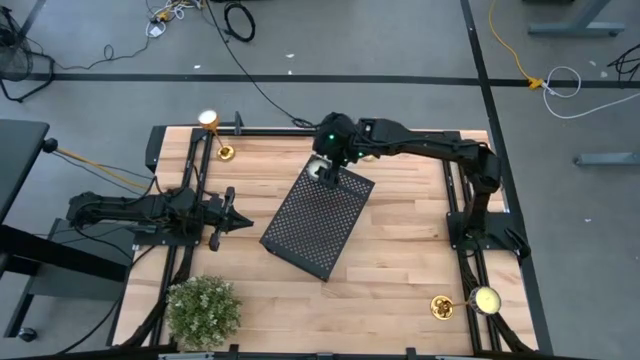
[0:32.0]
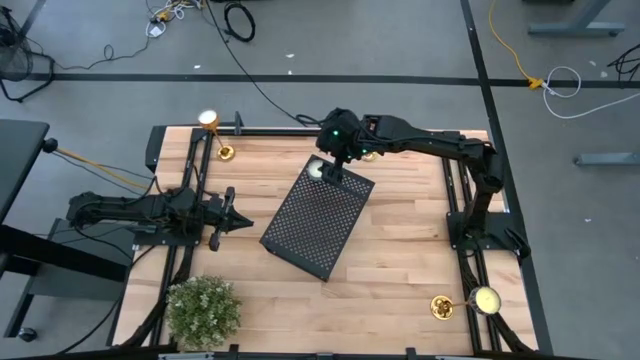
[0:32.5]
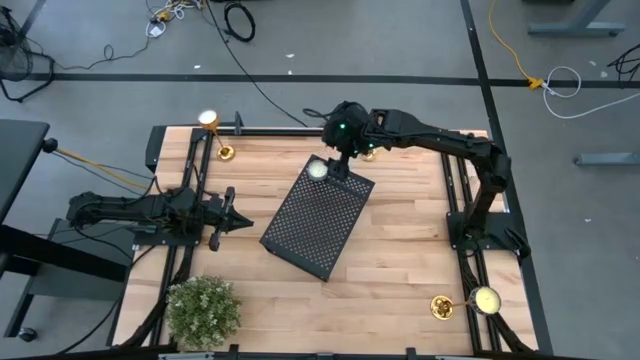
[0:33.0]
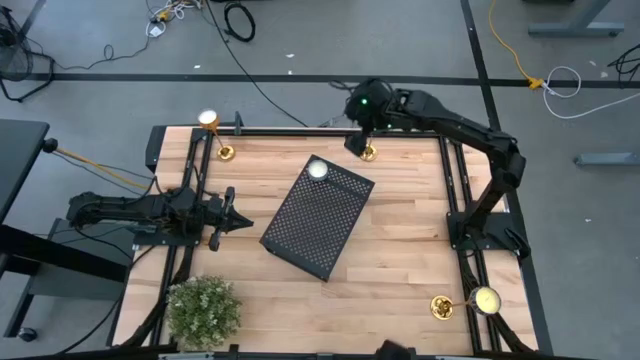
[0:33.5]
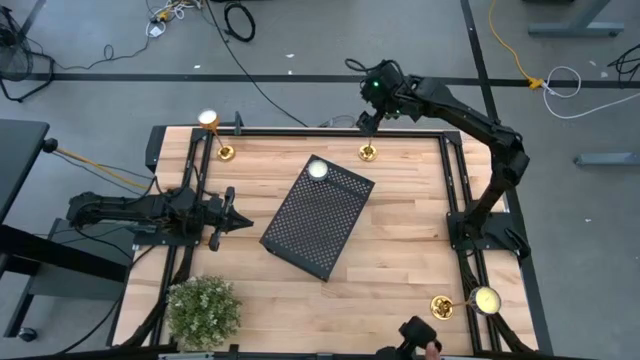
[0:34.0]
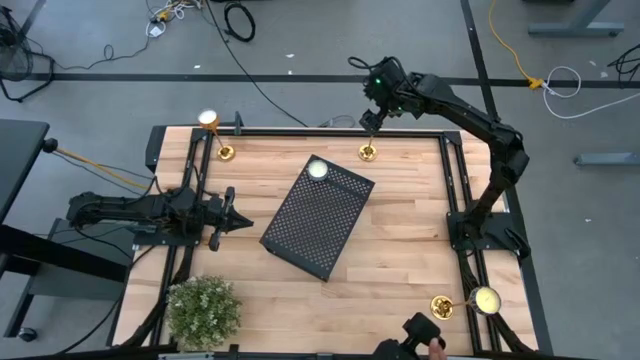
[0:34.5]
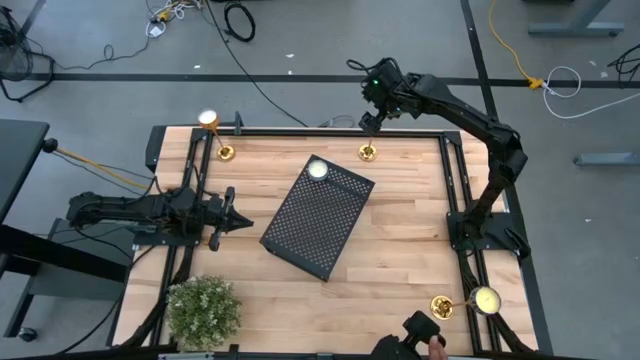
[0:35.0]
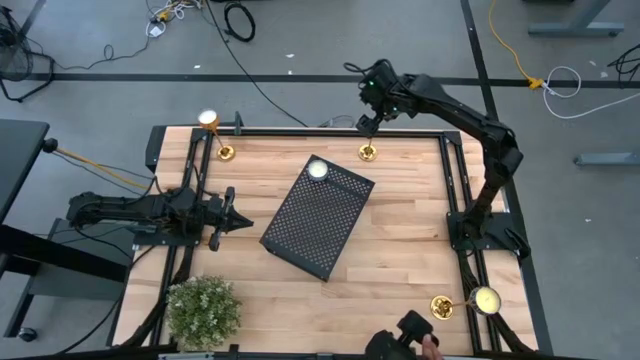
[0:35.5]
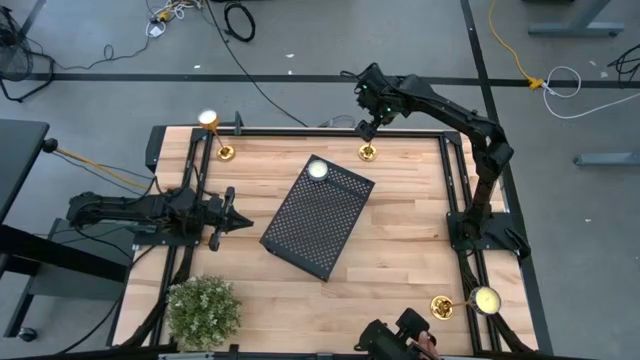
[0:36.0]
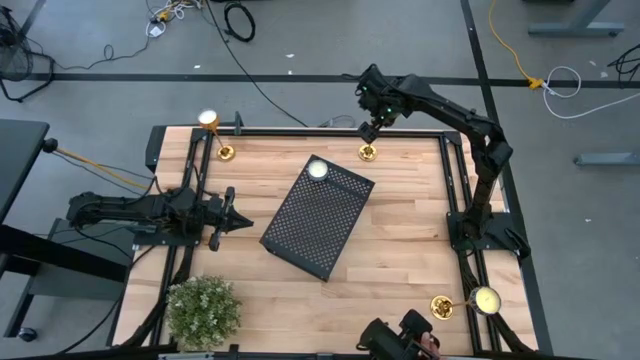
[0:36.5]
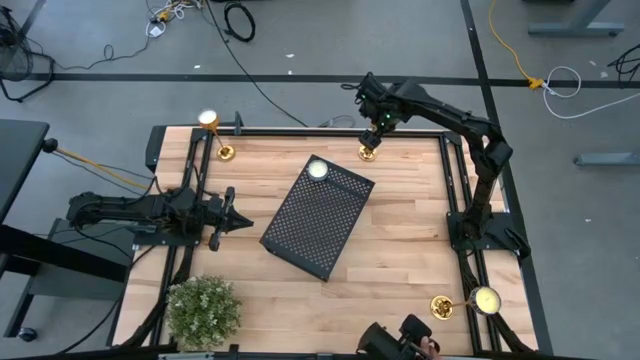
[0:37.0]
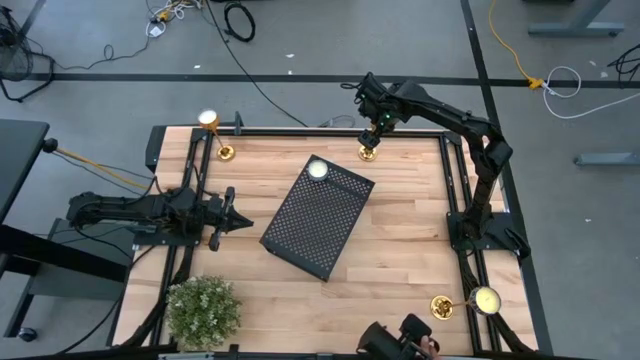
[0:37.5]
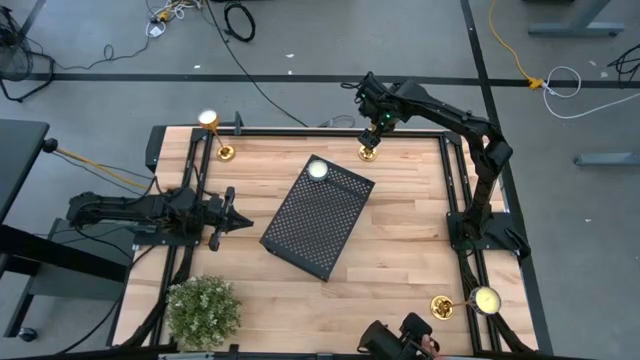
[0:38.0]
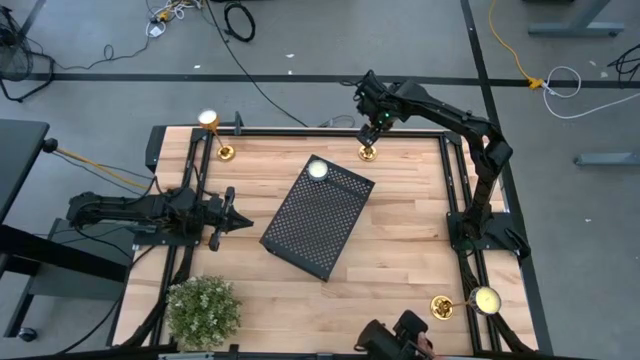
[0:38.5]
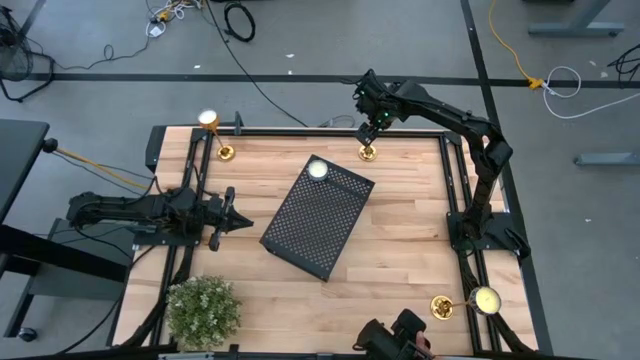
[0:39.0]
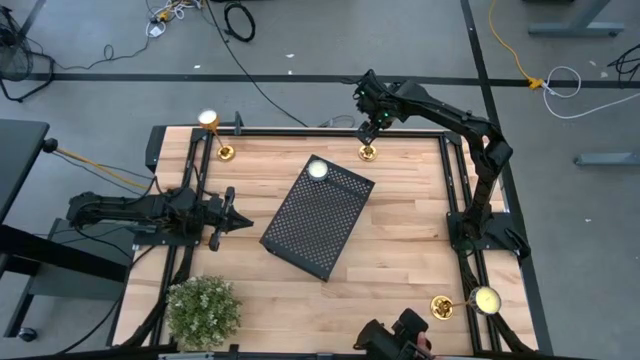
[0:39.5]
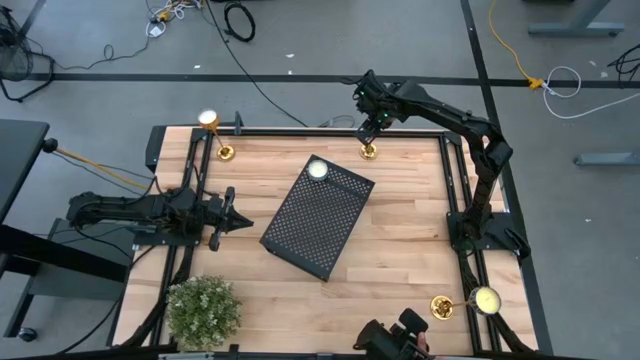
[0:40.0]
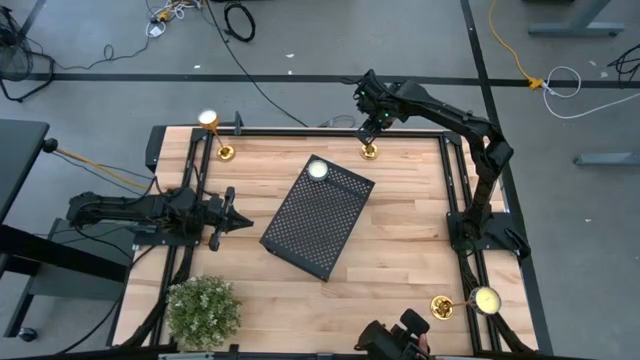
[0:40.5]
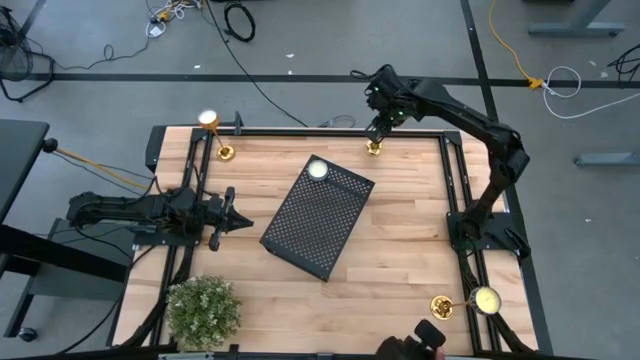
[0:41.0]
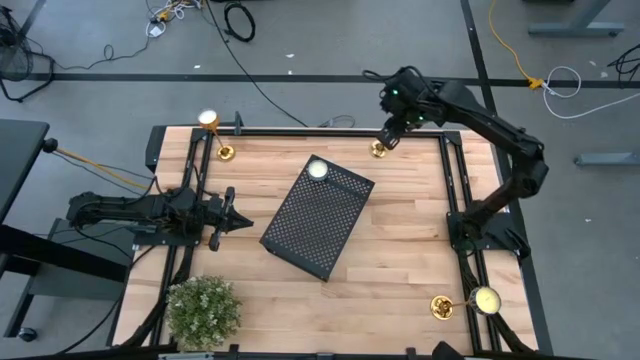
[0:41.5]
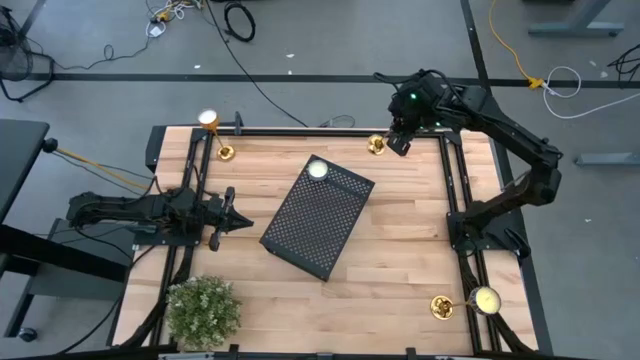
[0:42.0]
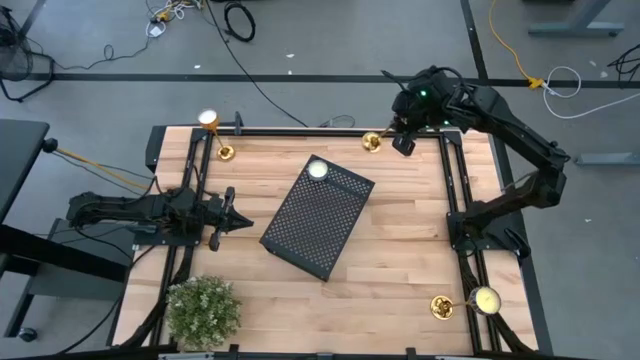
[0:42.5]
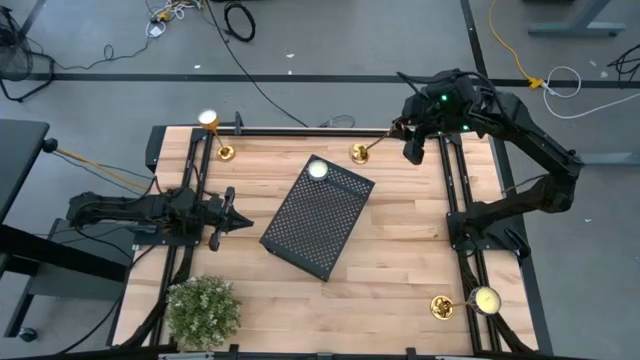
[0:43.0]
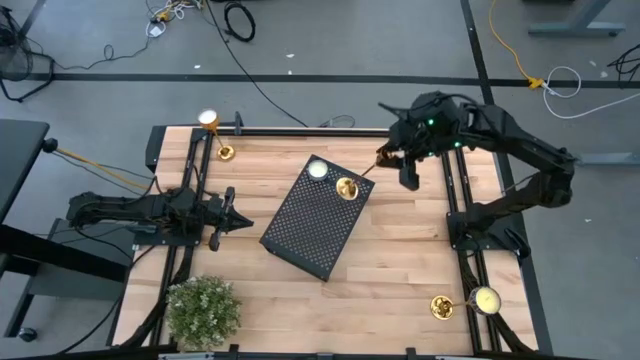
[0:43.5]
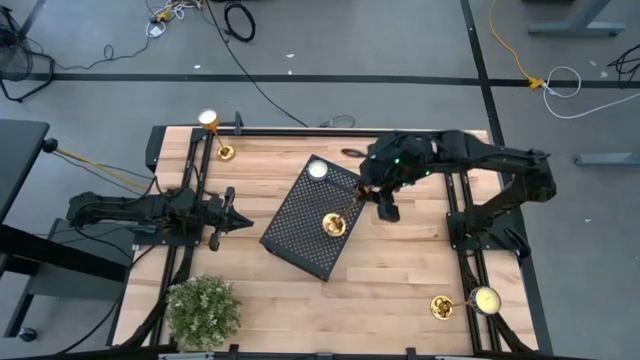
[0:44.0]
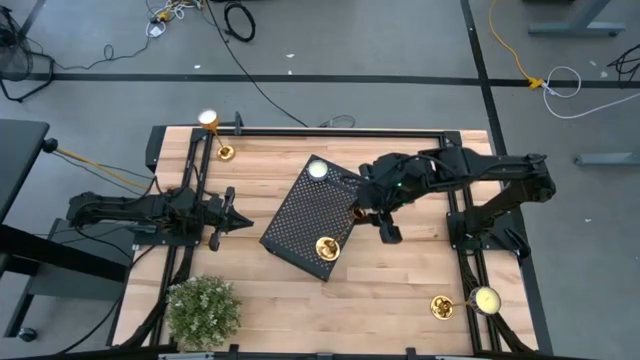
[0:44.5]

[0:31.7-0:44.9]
Task: Stock candles on shelf
Put the top right gold candle holder on the shelf

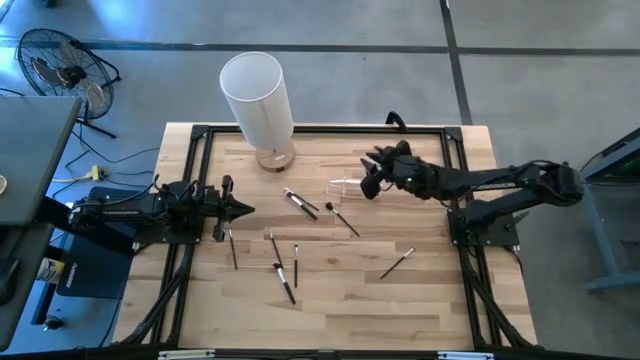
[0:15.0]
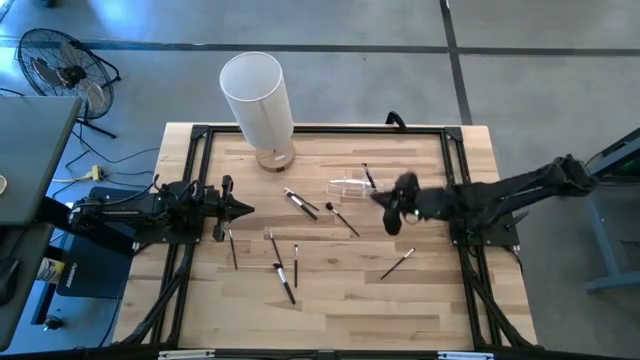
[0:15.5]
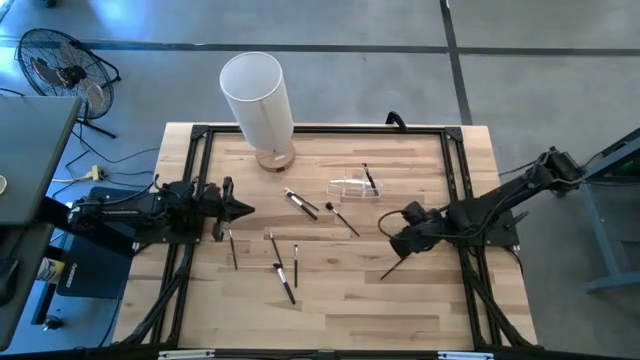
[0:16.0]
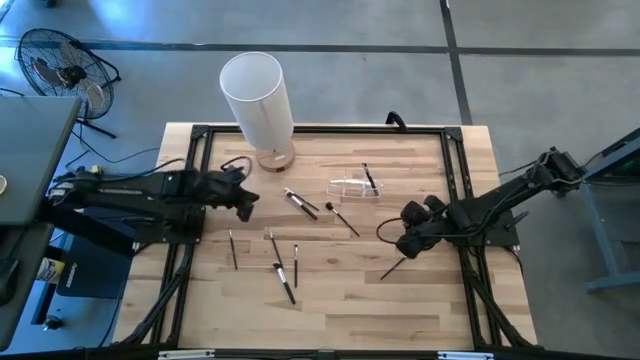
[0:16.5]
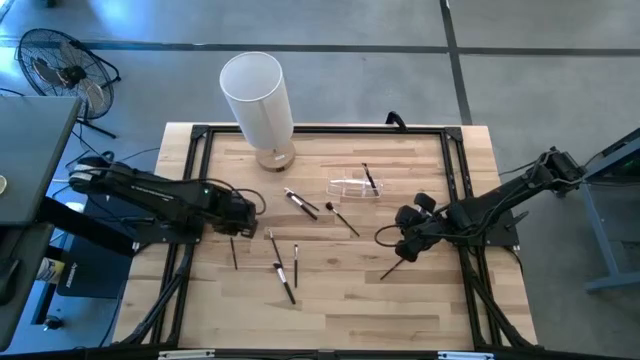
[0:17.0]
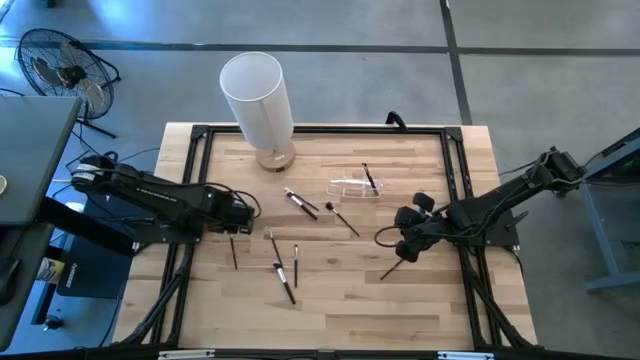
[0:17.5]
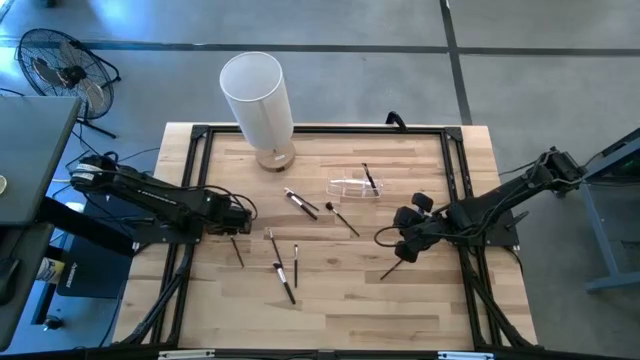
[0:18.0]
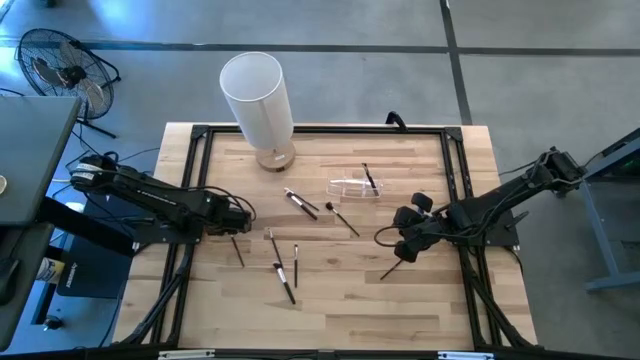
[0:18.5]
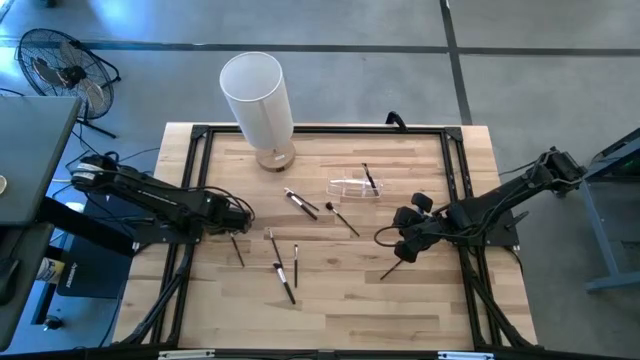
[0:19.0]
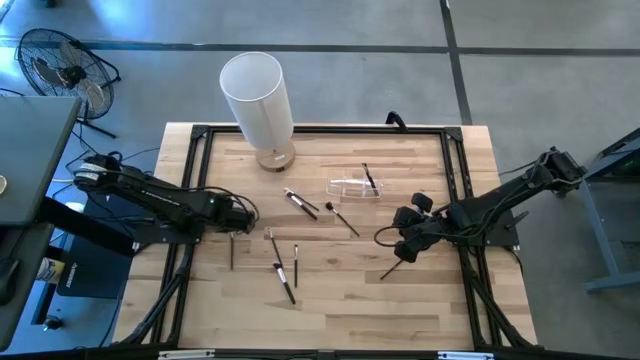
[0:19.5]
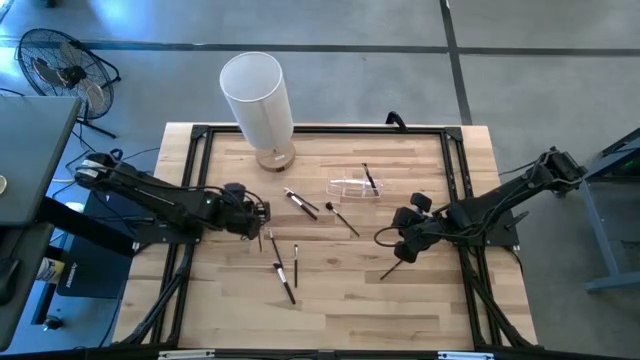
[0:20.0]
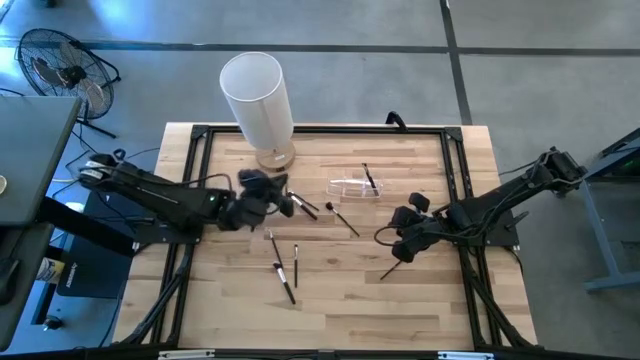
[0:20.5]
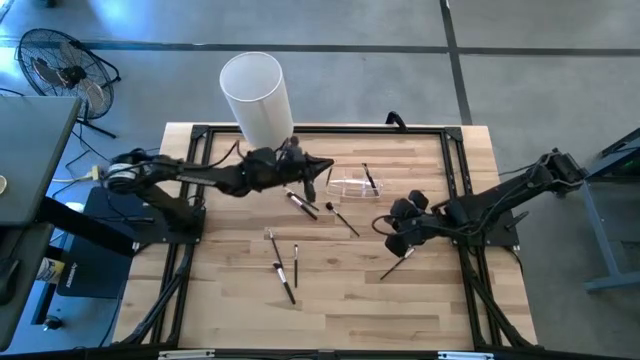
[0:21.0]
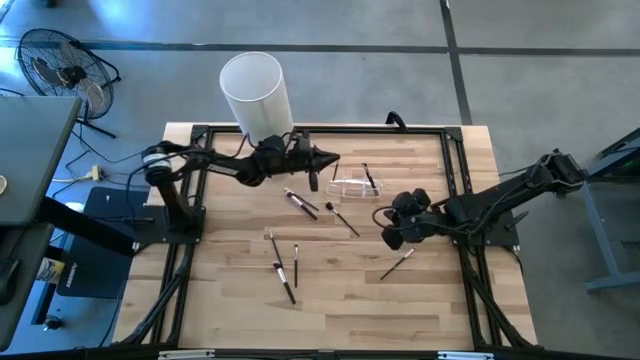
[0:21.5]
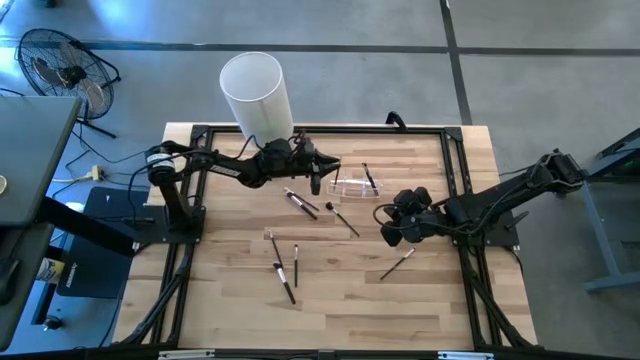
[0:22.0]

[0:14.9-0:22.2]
Task: Put items in baskets/containers
Put the black eyeshadow brush into the transparent organizer

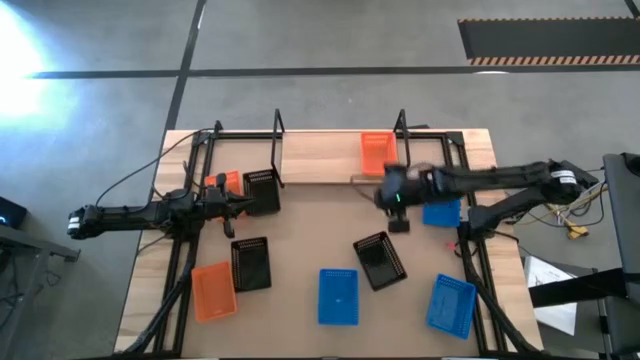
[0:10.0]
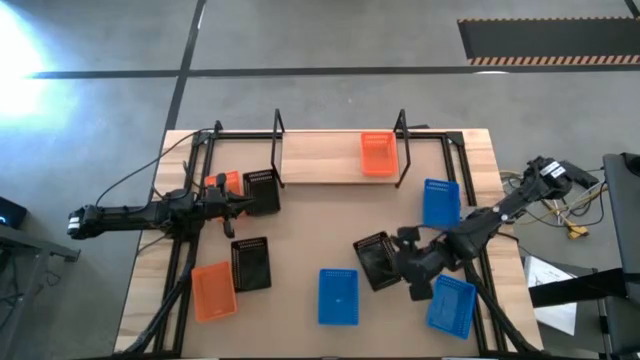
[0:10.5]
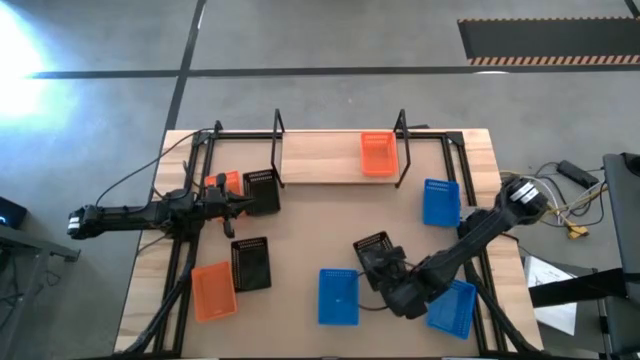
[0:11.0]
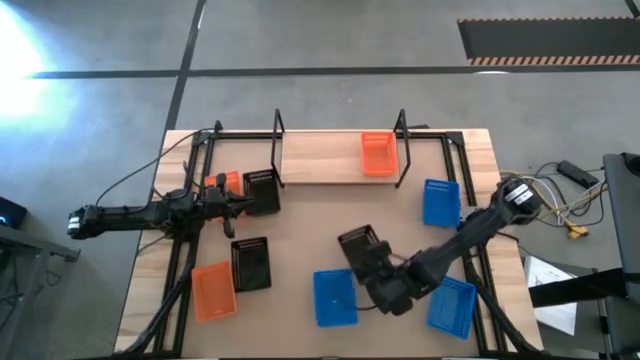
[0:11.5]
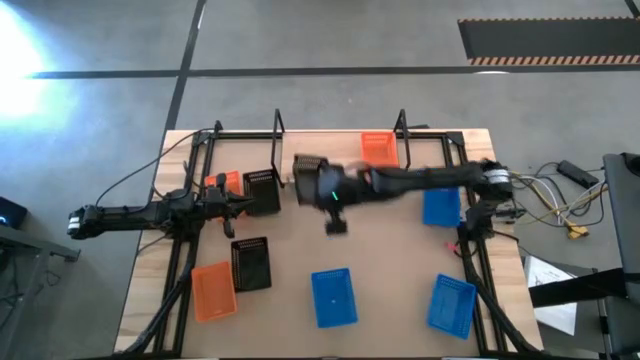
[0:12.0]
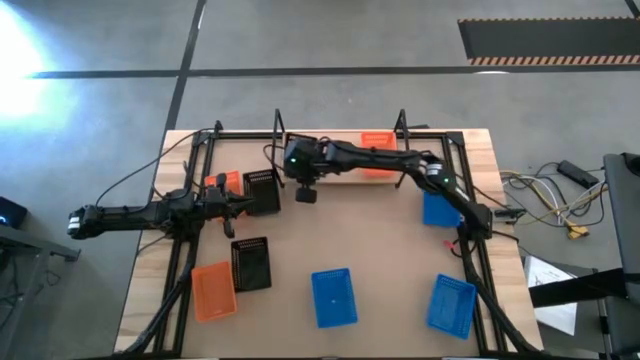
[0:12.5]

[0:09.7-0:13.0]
Task: Stack baskets on shelf by color
Put the bottom right black bin on the shelf
